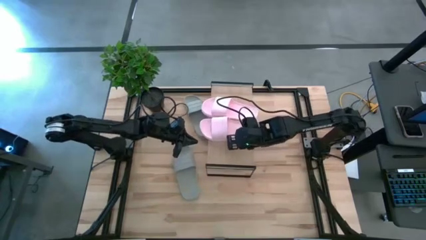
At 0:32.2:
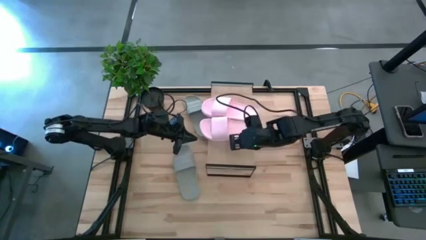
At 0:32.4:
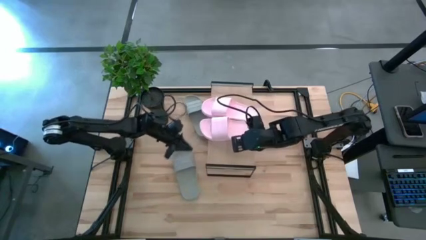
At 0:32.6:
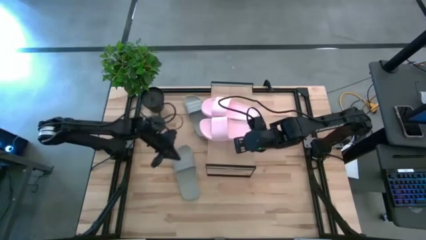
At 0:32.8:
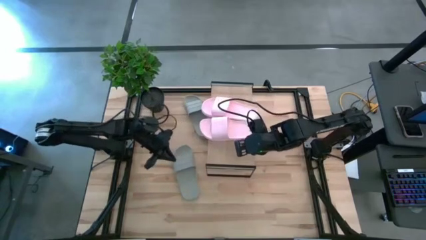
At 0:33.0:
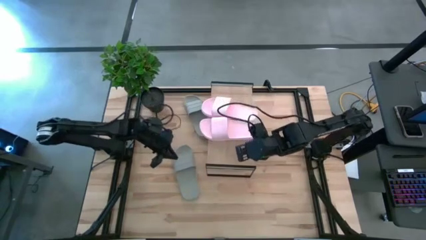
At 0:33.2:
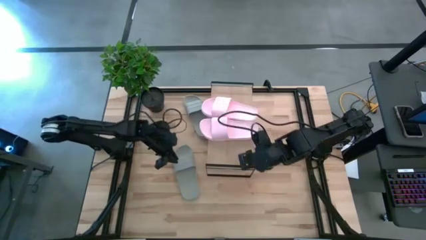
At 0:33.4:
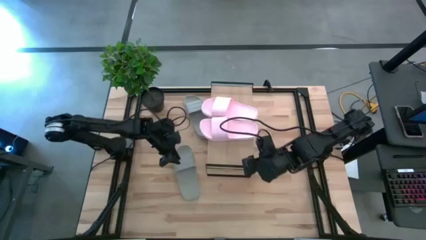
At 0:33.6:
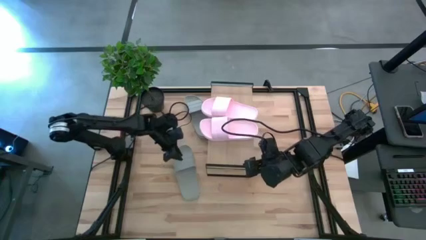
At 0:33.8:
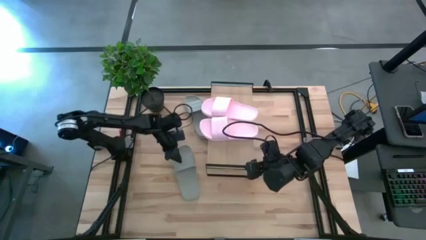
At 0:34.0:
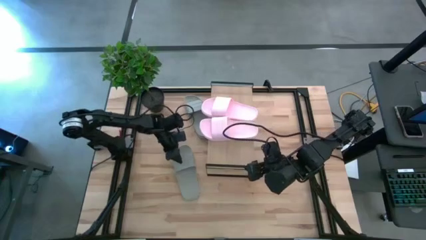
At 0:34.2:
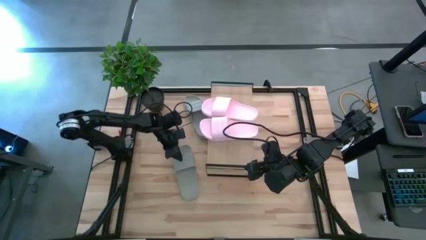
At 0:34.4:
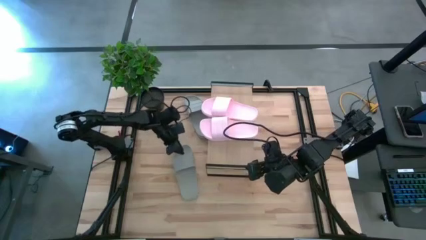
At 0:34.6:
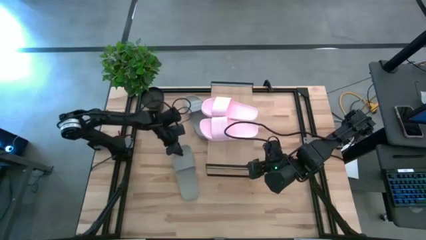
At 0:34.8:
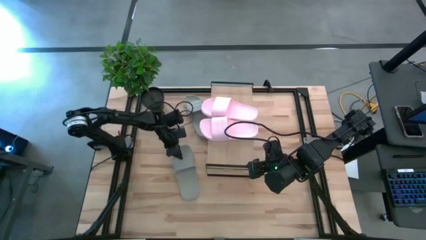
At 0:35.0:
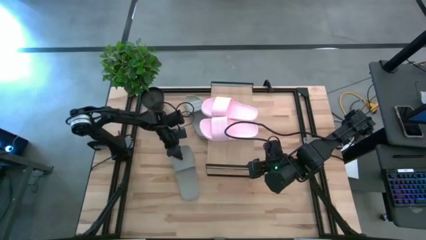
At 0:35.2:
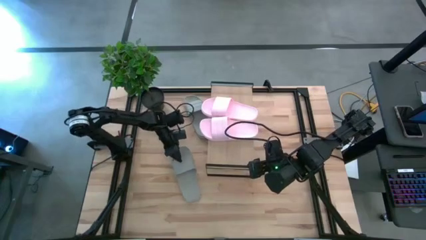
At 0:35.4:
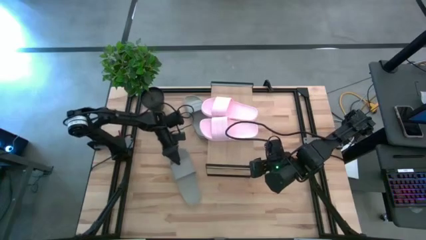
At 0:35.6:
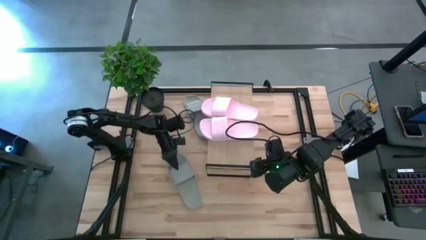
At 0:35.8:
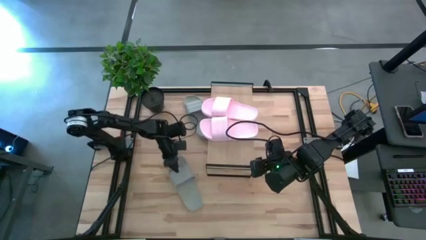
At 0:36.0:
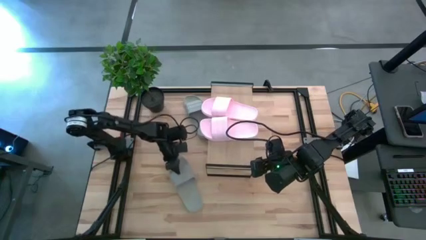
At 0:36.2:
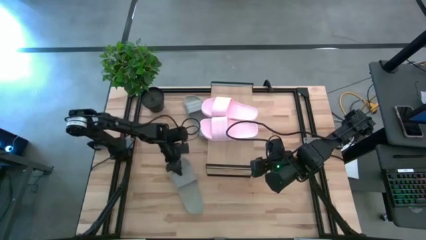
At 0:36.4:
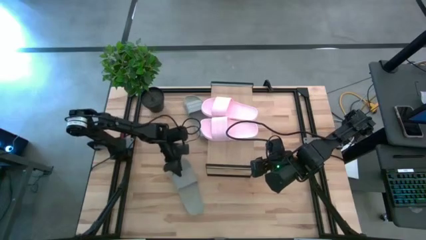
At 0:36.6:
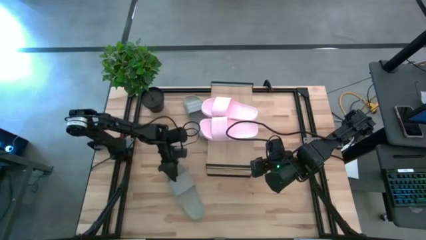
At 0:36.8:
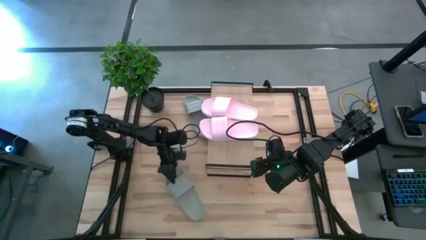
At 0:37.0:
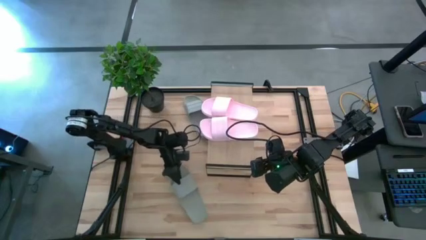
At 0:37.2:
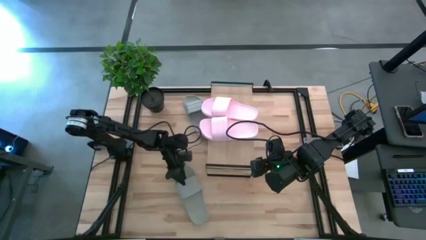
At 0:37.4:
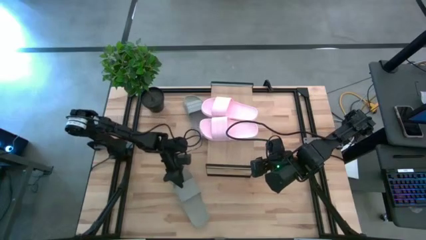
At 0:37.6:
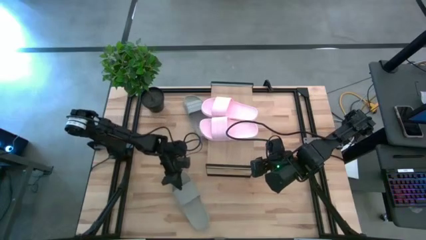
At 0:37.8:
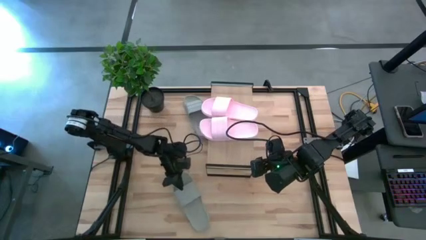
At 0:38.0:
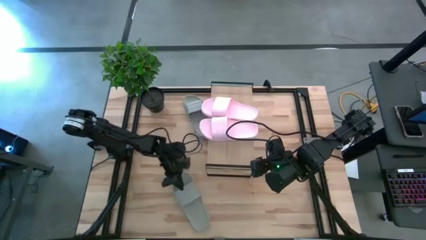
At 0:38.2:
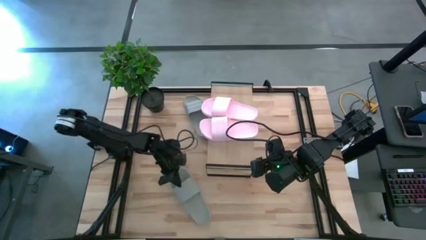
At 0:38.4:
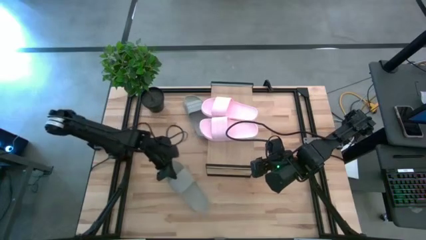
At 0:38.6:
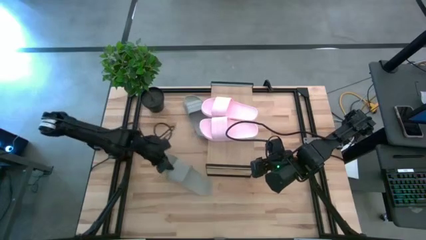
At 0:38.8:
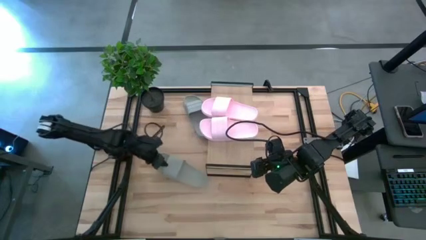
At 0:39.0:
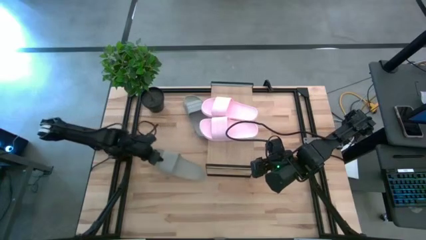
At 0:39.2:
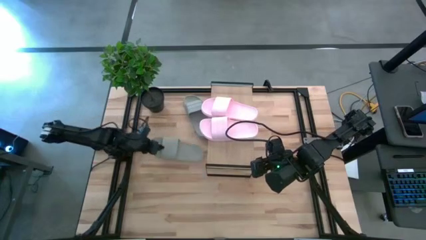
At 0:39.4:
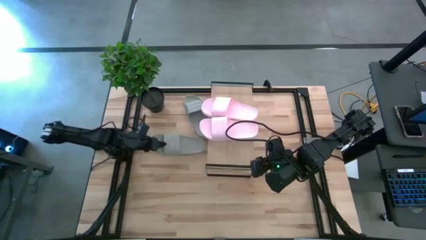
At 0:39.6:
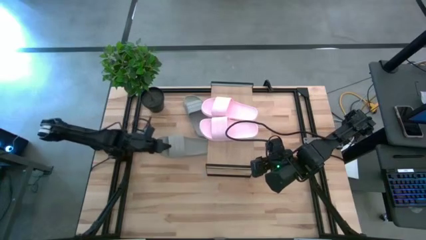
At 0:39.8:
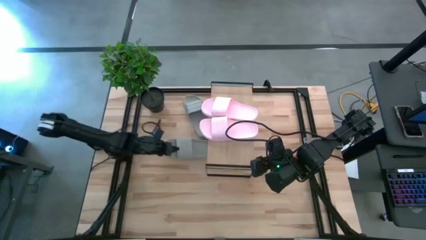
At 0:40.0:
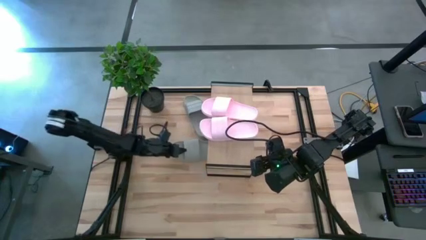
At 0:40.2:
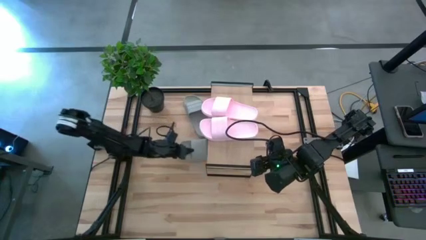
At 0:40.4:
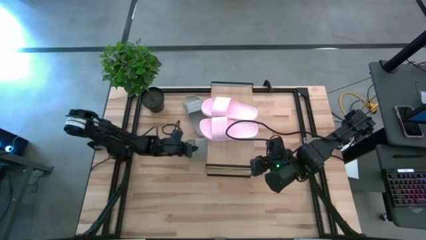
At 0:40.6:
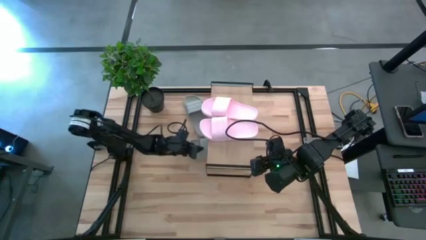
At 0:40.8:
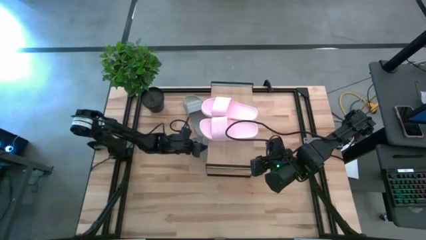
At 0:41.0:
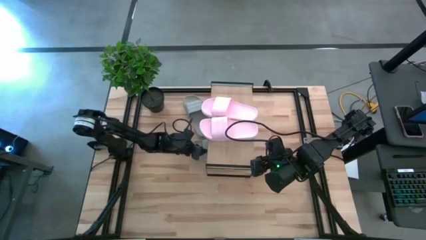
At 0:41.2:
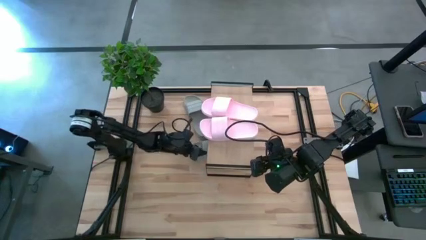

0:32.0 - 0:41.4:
Task: Pick and place slides into the shelf
Put the bottom grey slide under the shelf
